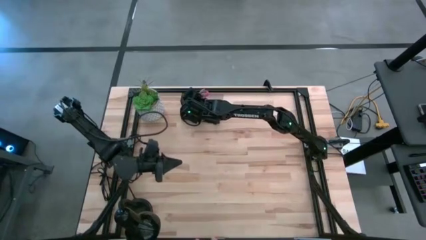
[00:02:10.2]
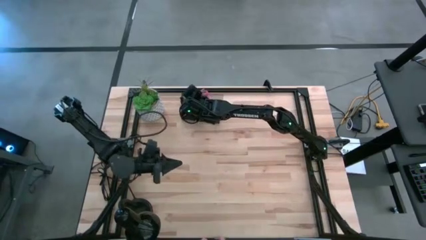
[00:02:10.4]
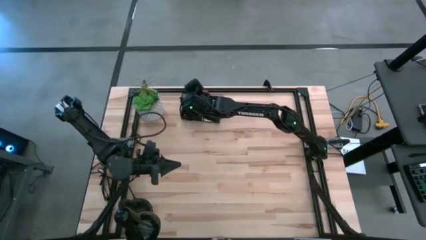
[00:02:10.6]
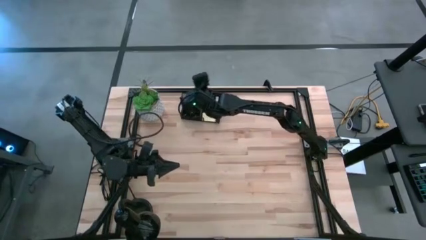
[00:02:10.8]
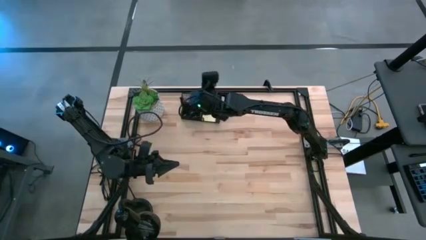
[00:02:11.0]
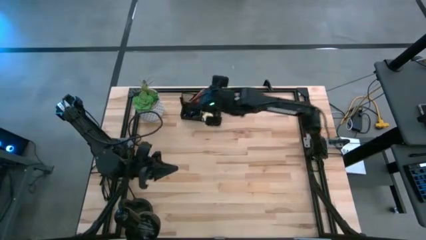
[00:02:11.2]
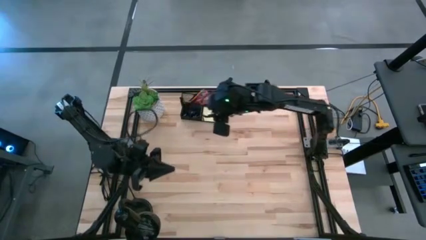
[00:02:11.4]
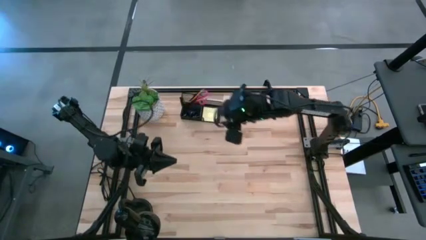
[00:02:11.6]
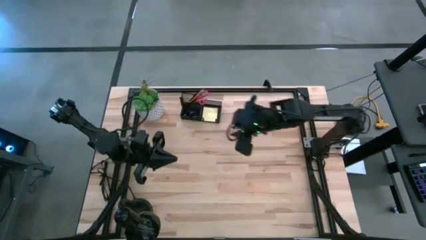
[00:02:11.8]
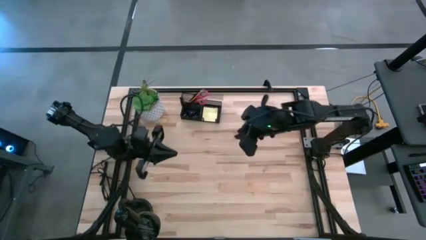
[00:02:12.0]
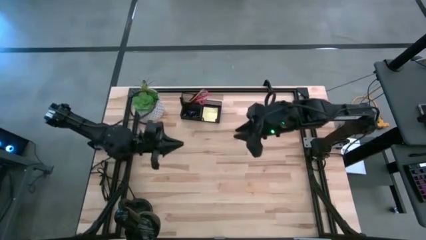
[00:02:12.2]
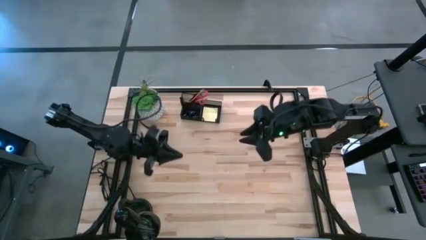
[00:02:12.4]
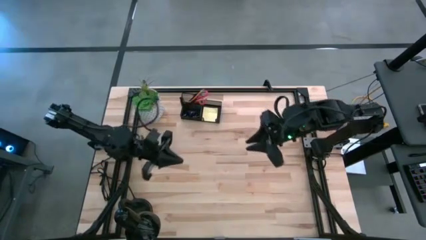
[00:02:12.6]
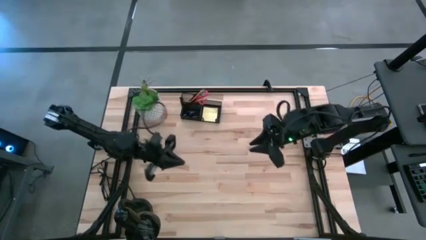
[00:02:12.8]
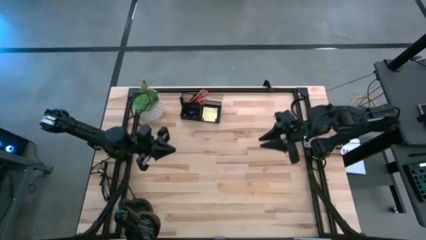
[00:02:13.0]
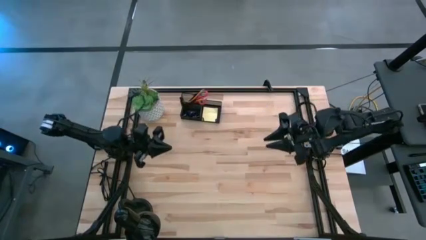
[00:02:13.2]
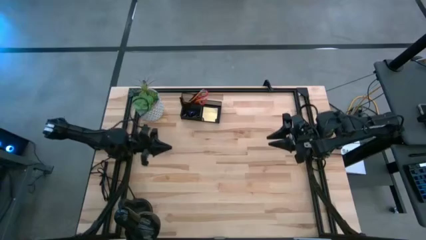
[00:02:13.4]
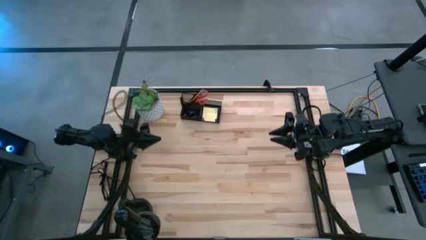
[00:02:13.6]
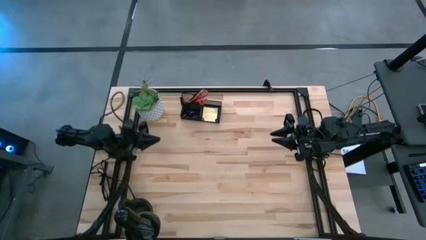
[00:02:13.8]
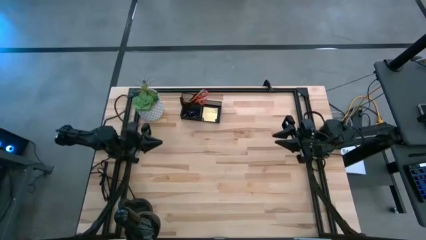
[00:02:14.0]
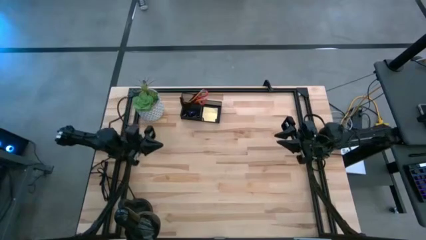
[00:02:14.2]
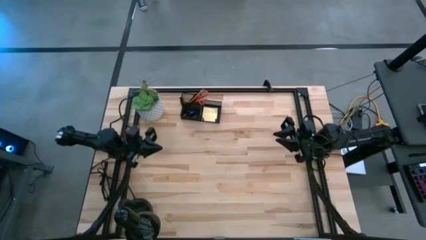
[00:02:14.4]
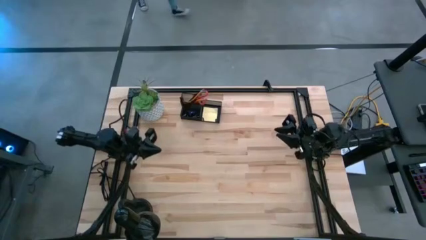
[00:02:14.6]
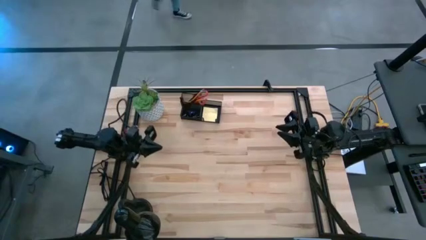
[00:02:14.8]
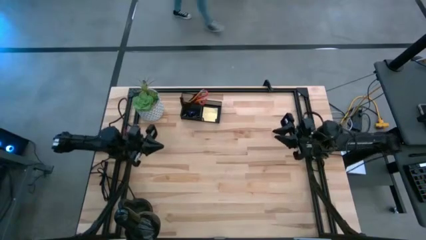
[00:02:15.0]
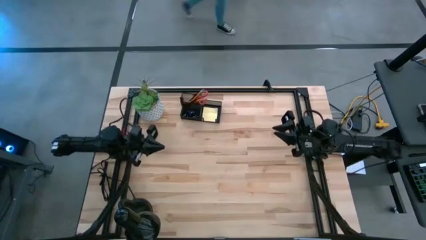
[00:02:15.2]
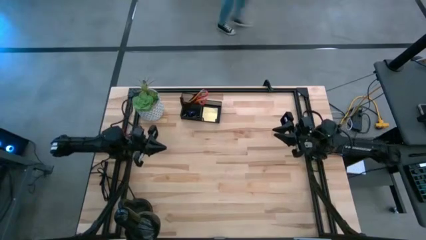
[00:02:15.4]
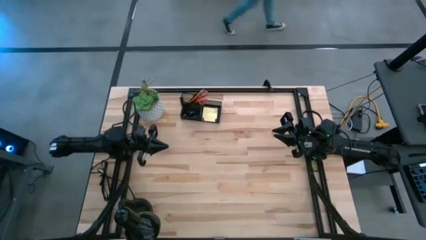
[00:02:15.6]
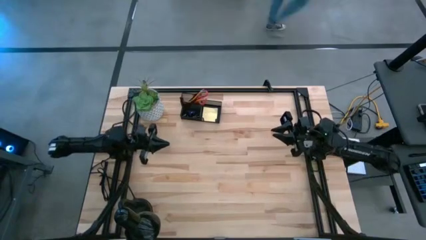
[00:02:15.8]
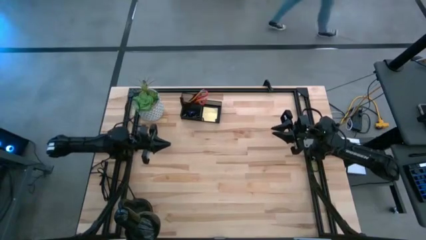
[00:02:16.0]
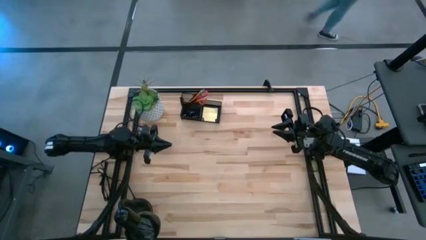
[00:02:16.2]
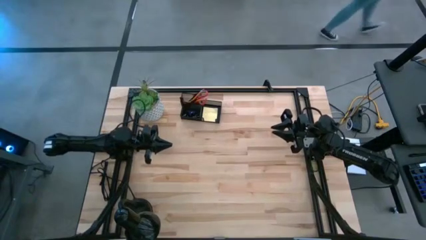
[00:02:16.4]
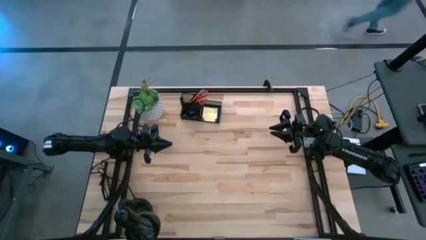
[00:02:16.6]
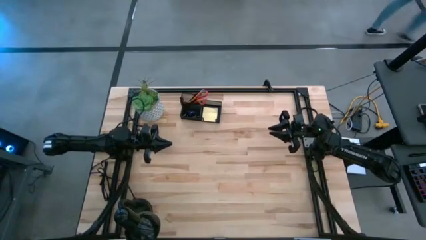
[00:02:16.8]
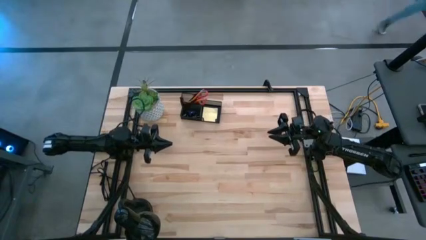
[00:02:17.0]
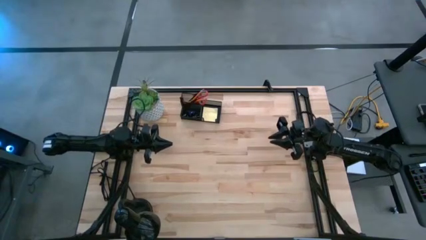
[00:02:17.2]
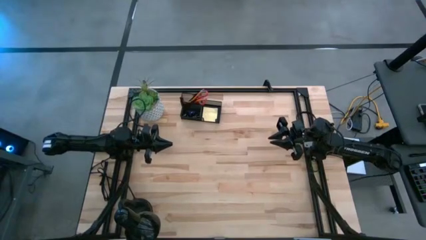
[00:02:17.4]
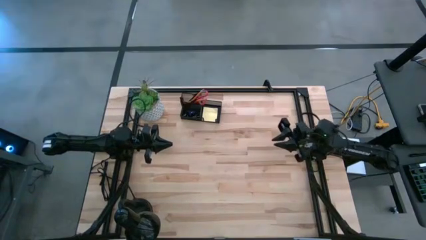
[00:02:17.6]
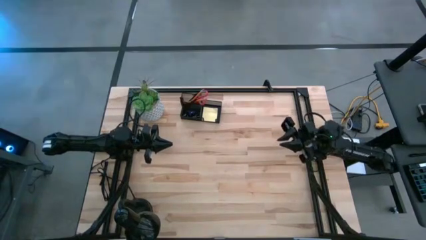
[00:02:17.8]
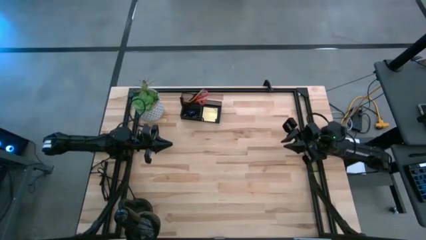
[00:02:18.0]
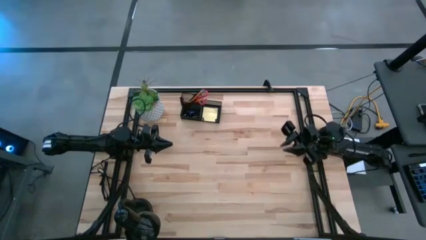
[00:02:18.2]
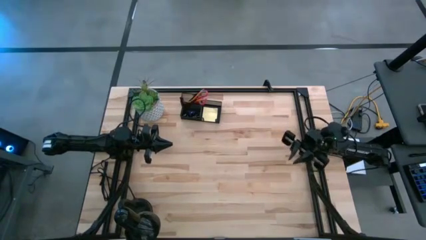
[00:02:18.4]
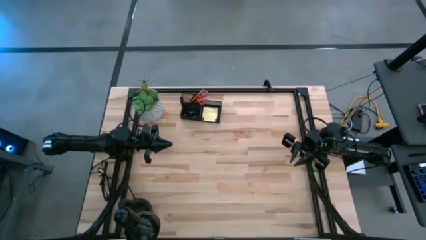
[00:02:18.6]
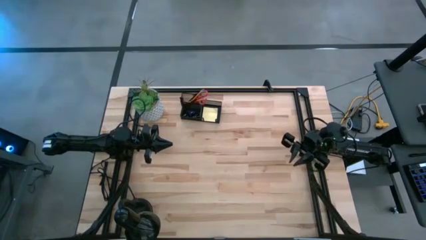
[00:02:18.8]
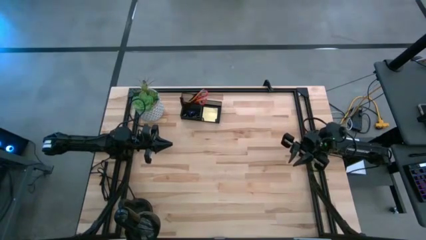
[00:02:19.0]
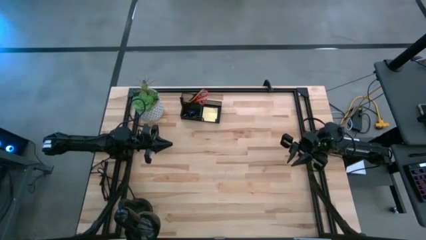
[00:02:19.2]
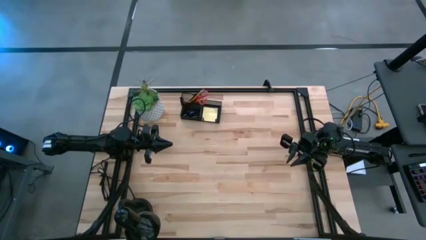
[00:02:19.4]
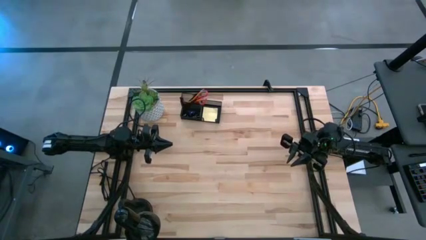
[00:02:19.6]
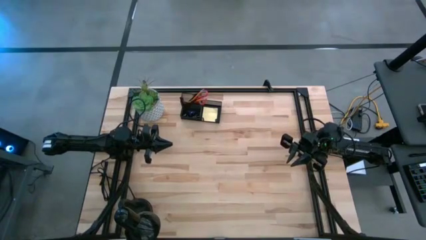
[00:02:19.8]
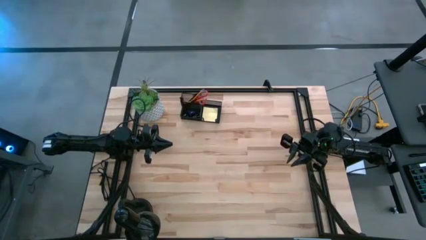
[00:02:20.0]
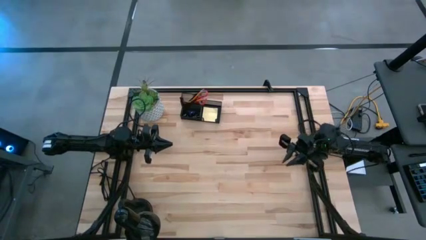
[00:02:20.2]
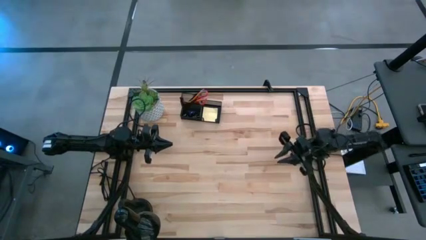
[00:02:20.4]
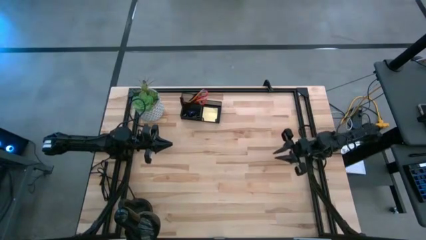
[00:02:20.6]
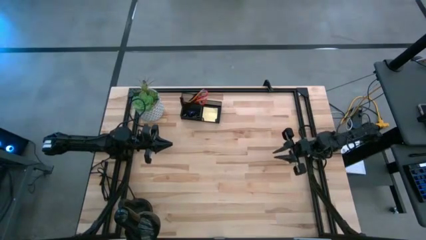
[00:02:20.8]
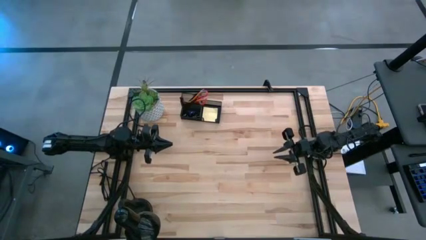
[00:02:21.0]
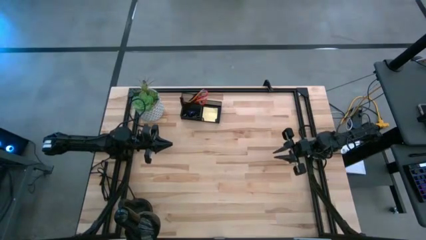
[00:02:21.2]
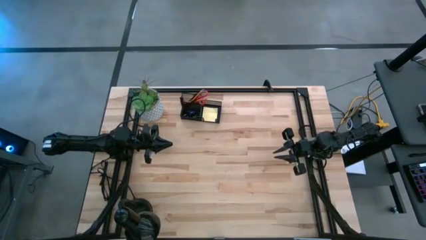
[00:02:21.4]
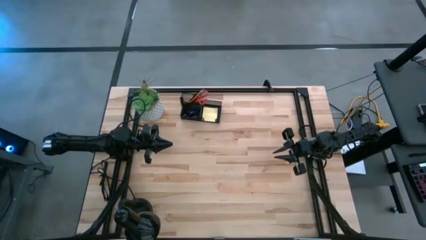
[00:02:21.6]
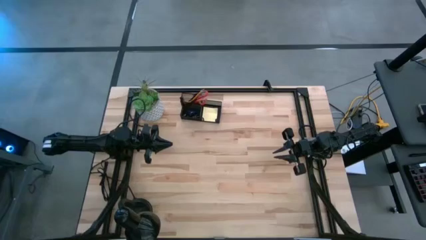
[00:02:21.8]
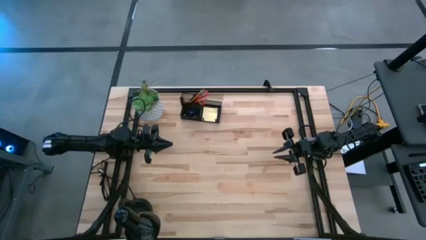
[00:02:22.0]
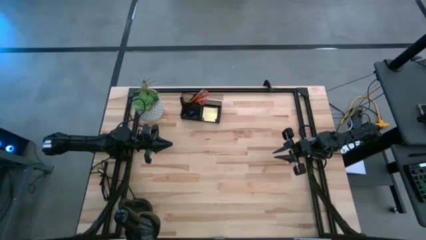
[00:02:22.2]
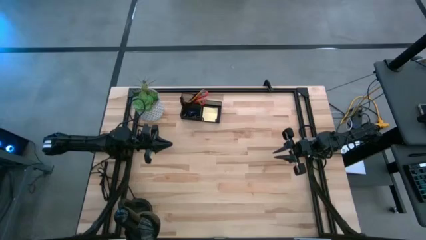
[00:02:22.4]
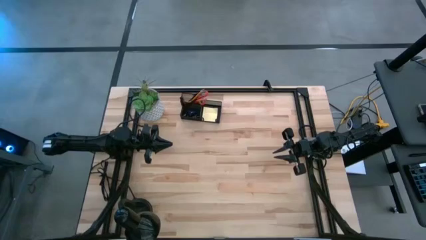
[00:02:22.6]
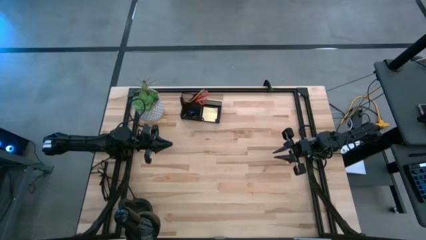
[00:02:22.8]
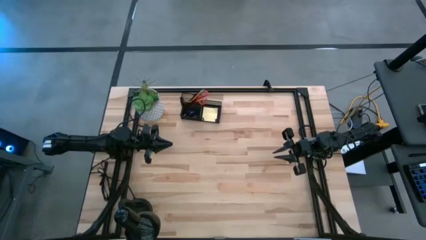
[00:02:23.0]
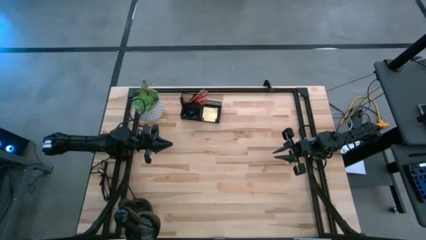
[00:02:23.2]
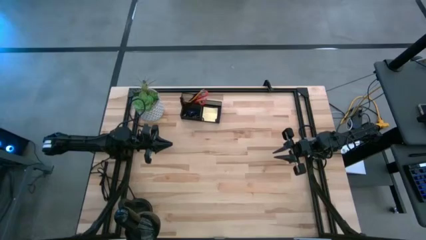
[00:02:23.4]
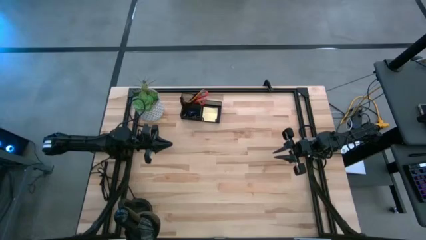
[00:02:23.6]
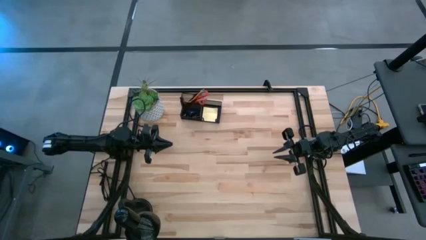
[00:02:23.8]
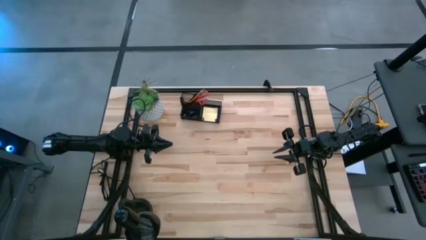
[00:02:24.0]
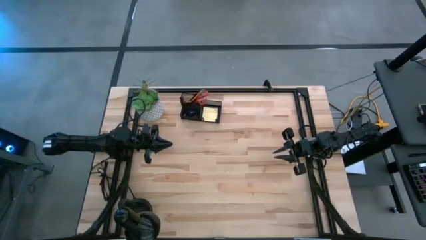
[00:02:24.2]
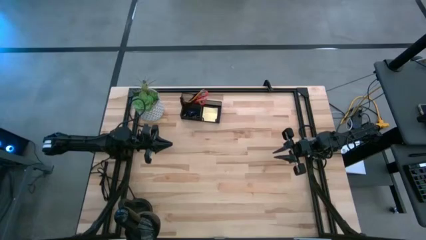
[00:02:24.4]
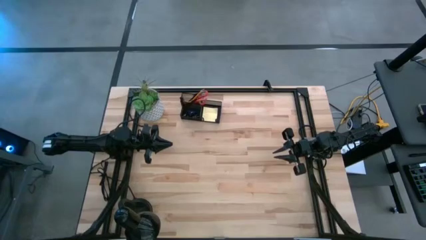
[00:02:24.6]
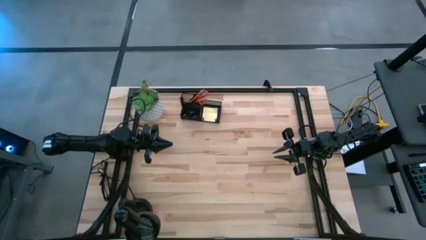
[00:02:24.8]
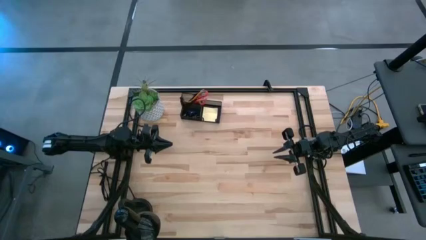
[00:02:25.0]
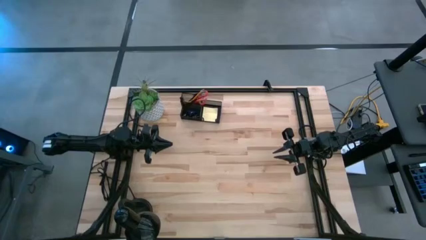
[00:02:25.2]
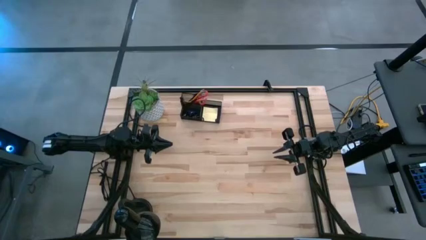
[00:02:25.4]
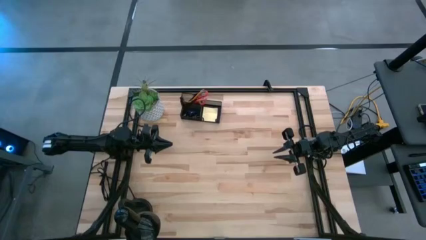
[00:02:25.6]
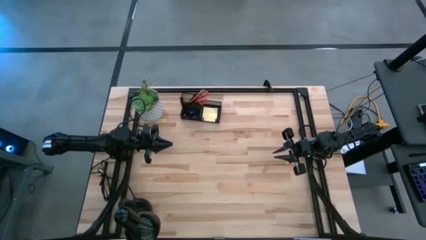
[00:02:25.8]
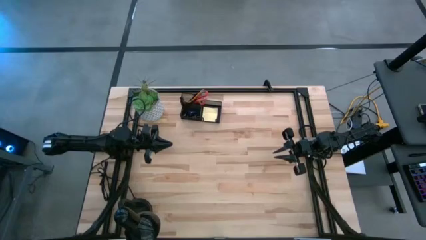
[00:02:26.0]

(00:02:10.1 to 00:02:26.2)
Task: Pick and place office supplies into organizer
Return to Home Position
